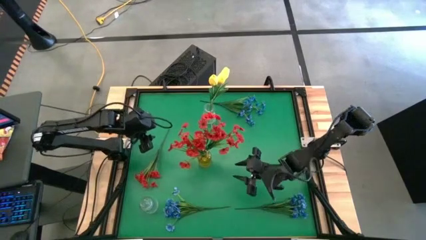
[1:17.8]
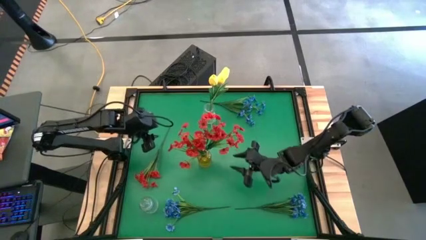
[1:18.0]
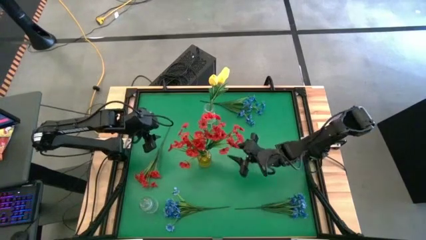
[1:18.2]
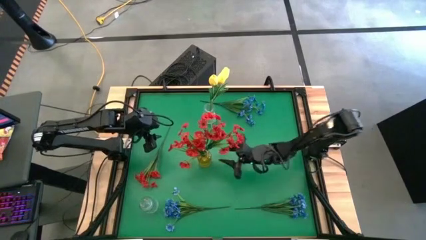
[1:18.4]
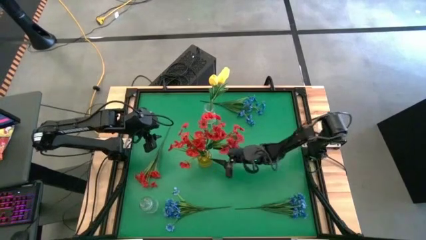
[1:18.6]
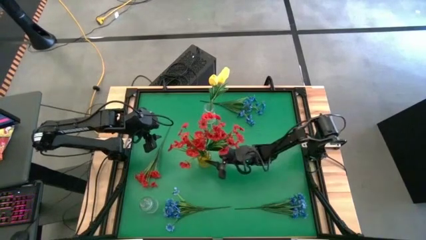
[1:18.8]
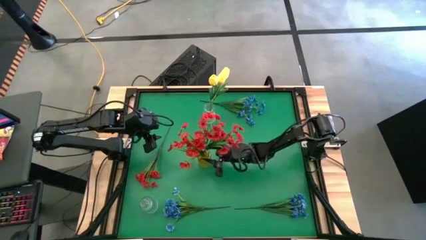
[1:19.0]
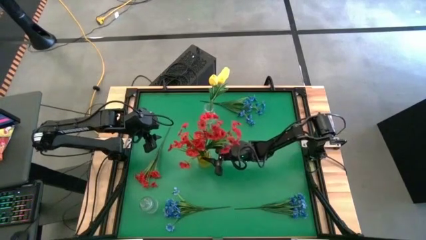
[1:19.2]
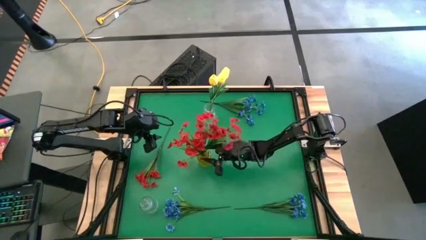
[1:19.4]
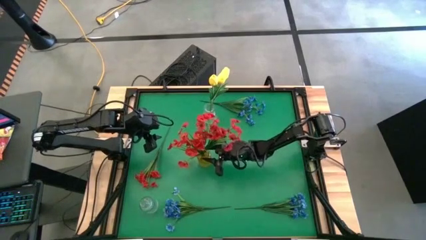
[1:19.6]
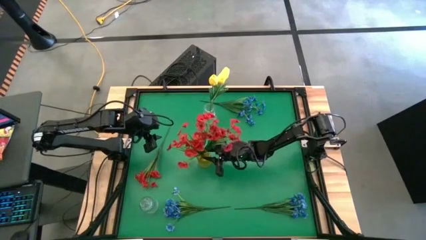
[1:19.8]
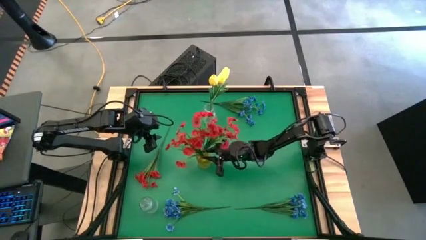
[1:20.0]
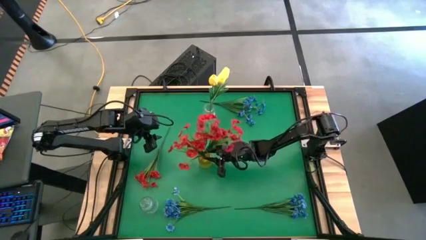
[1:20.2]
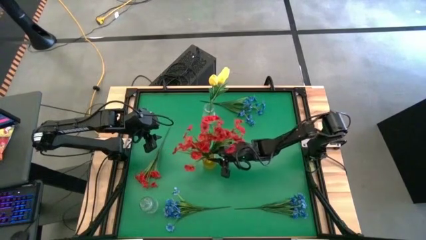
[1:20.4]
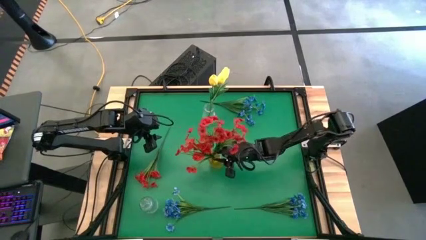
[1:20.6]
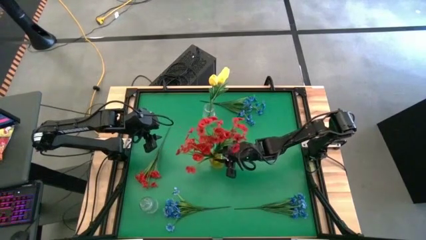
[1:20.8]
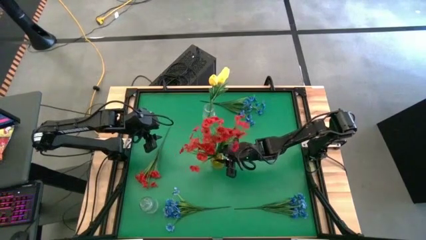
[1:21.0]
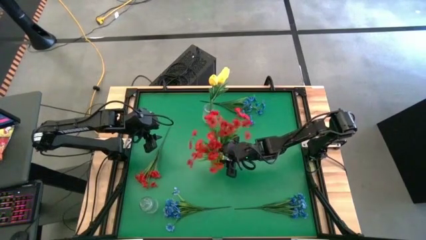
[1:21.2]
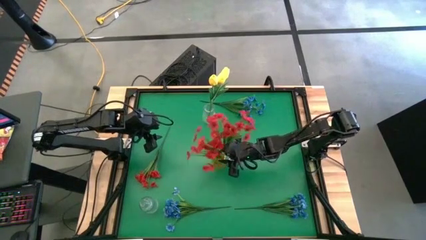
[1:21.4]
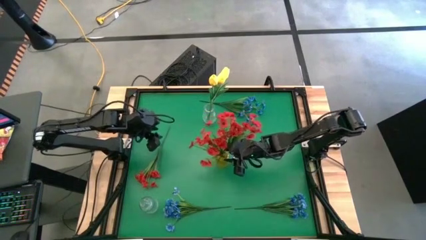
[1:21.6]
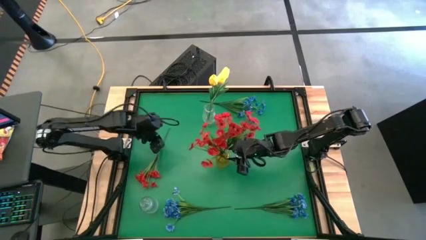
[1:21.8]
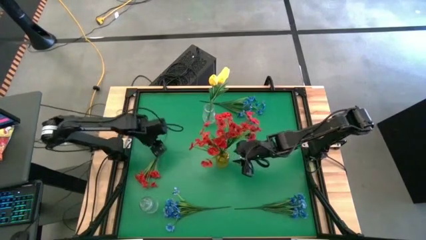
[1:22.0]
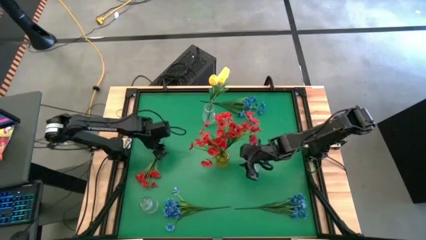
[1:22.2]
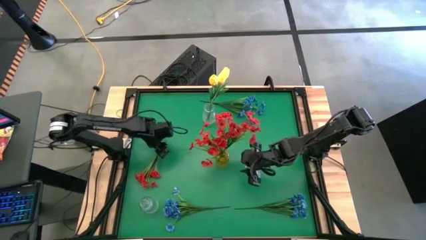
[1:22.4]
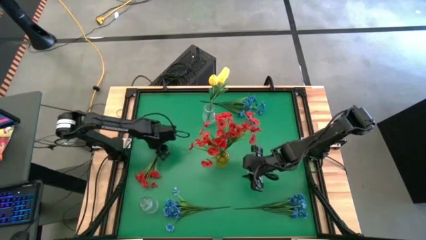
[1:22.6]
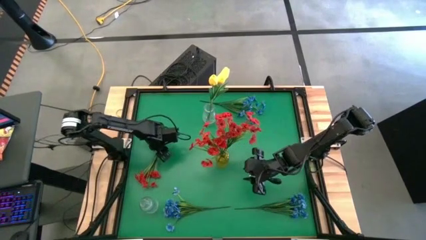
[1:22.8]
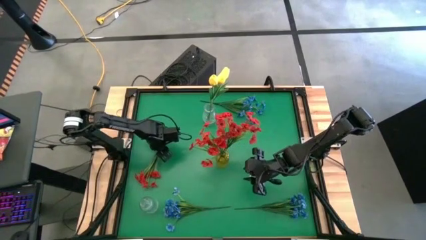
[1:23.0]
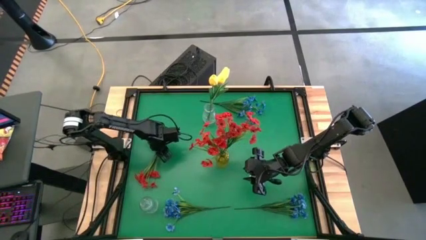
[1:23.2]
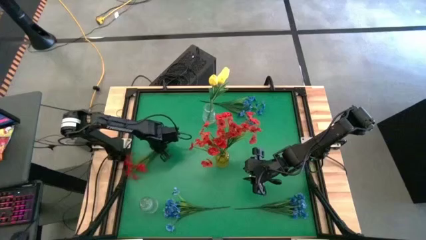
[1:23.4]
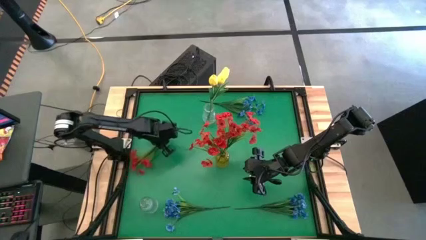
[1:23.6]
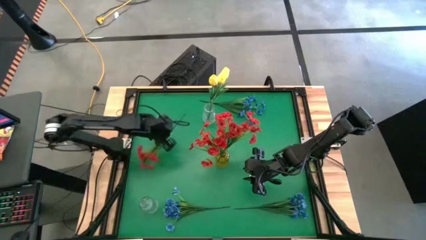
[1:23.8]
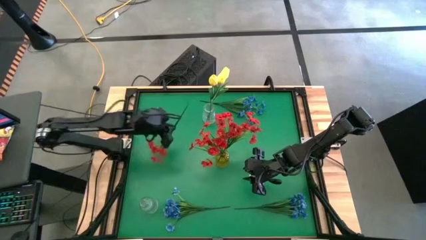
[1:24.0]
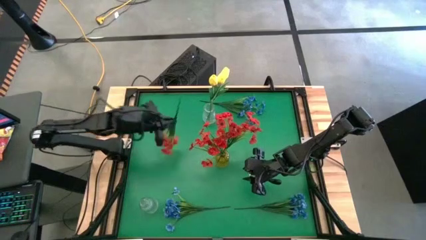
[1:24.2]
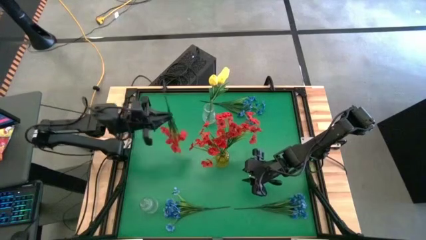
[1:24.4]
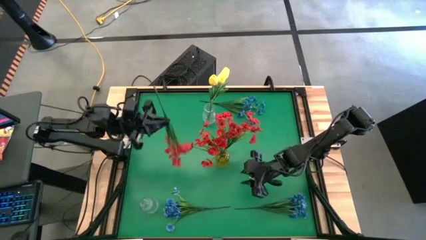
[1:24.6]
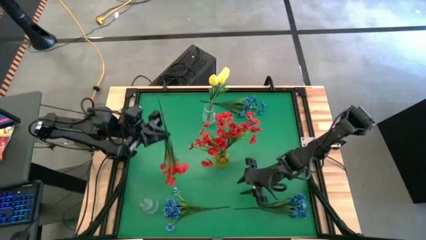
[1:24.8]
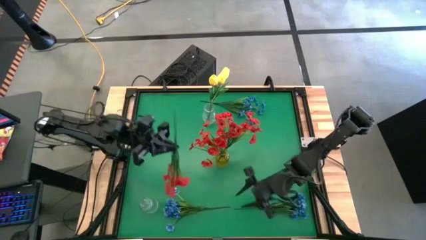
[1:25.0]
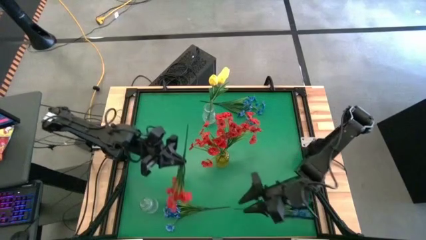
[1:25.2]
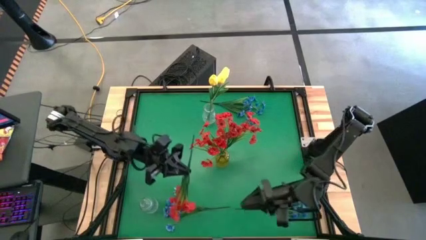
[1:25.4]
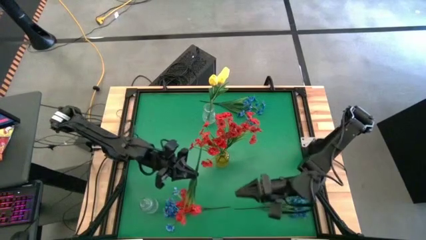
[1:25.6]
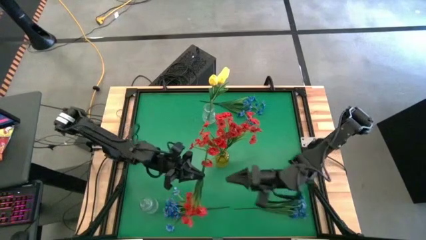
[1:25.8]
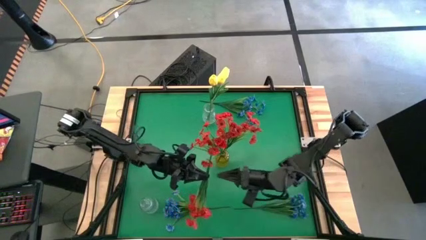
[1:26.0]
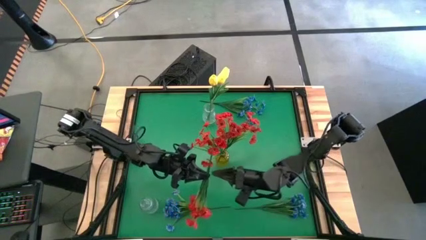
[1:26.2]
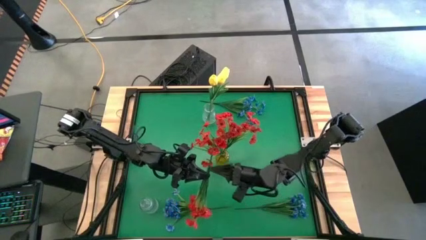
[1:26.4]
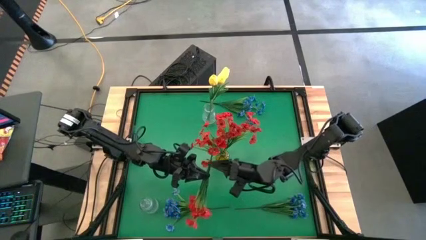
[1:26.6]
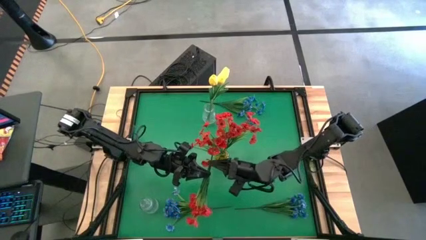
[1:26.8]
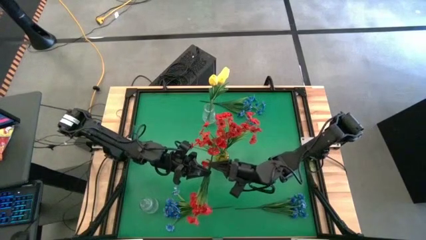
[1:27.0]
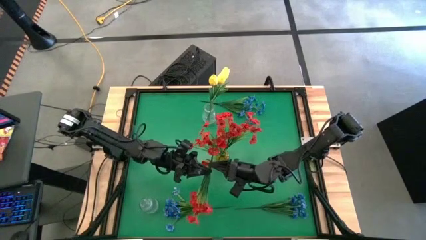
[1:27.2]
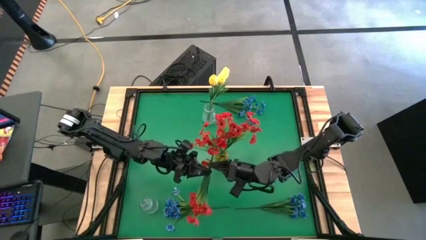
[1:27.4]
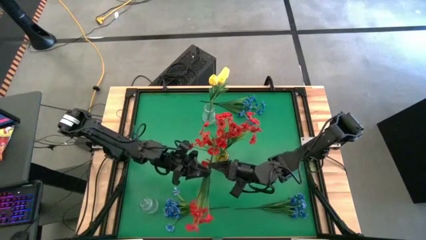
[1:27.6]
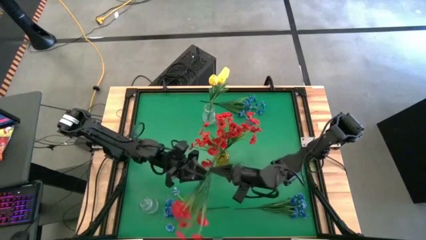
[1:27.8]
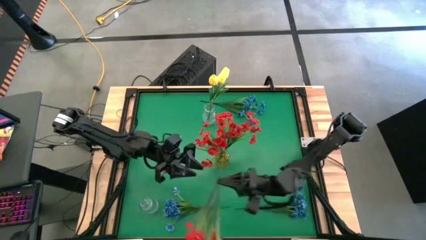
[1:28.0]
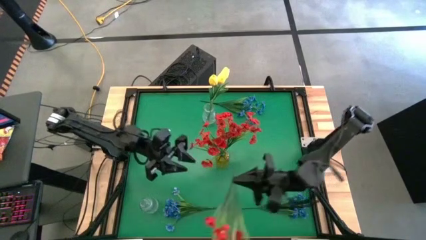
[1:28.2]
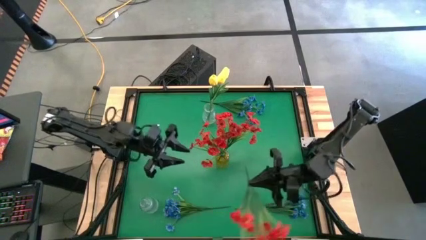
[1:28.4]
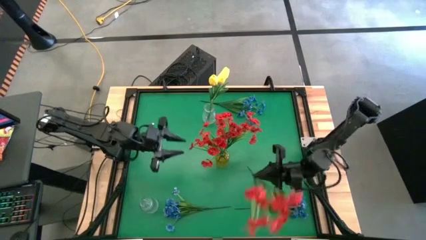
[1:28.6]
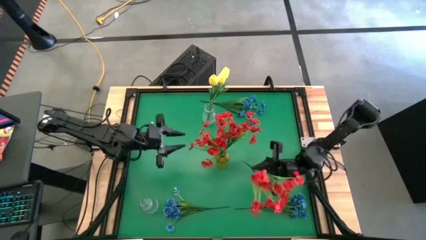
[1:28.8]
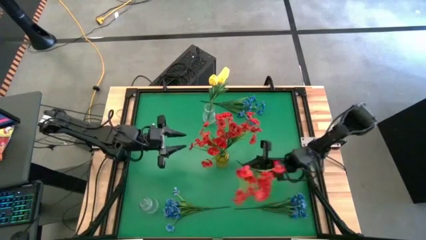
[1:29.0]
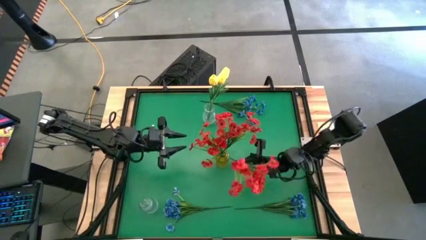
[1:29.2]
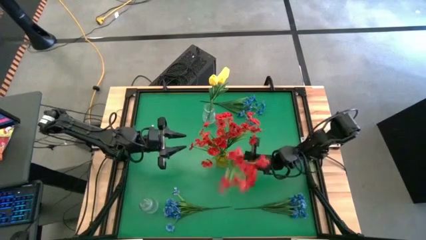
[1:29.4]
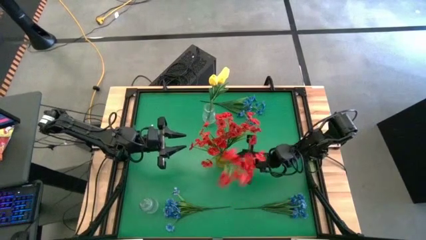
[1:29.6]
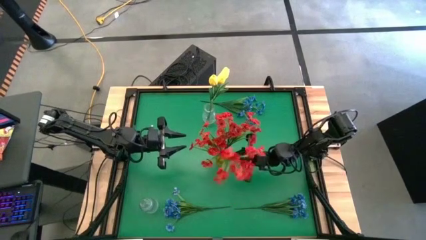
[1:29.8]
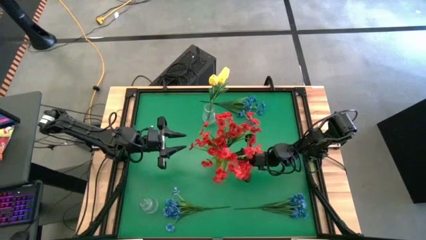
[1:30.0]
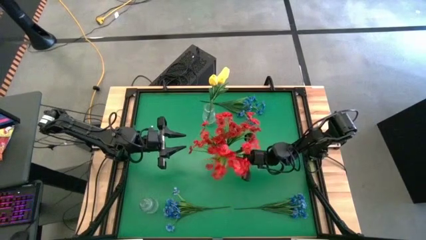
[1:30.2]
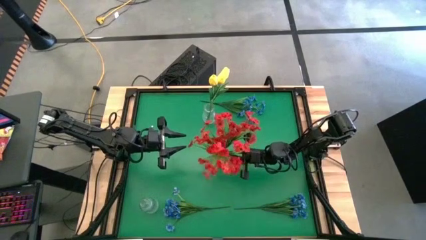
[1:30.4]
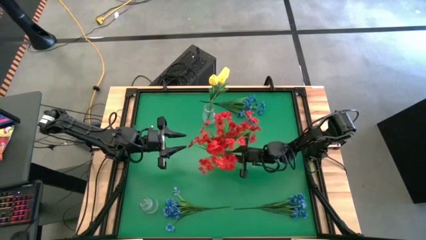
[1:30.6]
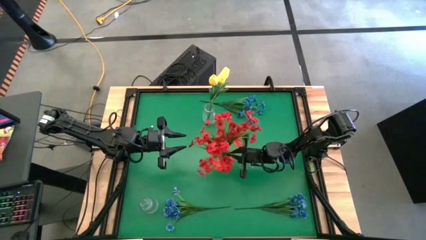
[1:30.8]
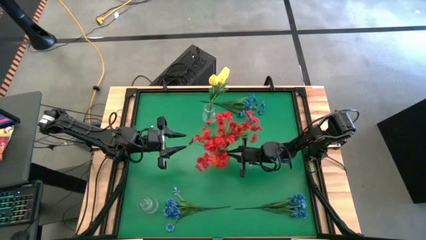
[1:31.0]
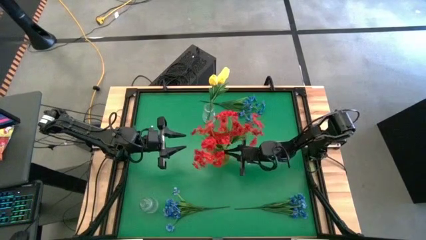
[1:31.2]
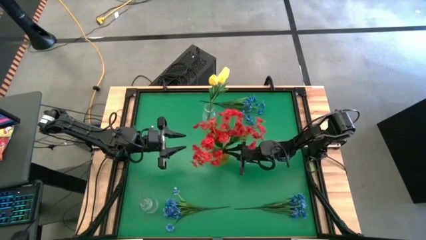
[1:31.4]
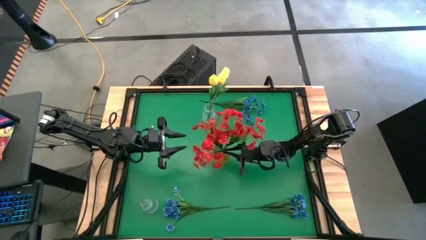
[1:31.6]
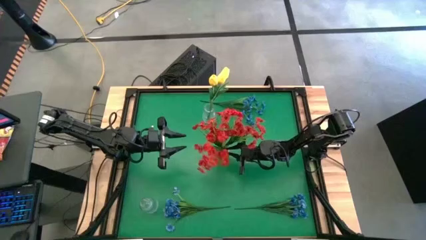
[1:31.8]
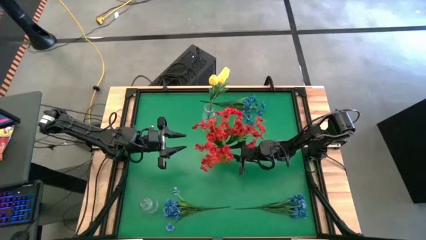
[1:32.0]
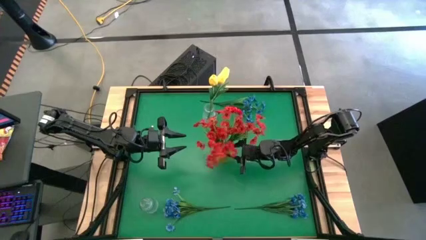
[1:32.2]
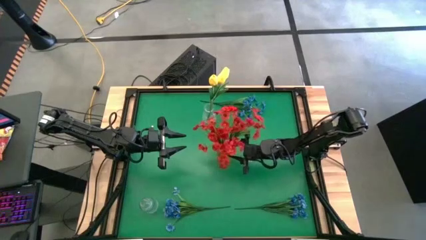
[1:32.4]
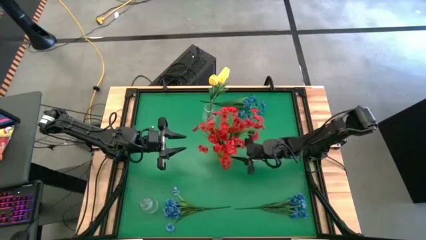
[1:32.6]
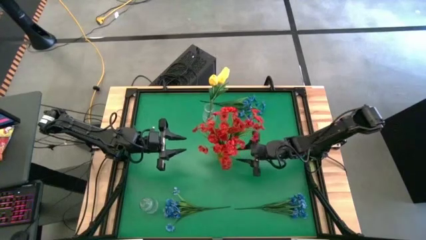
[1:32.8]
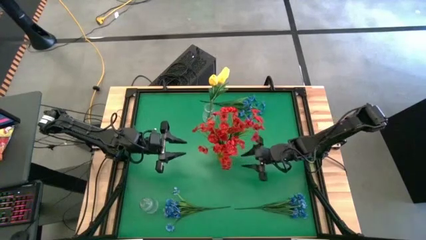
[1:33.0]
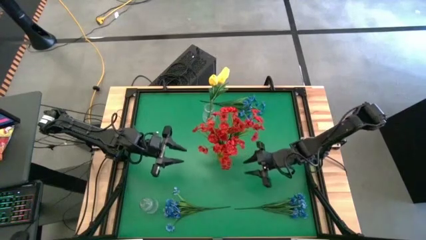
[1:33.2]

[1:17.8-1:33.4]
Task: Sort flowers into vase by color
Put the red flowers into the yellow vase
